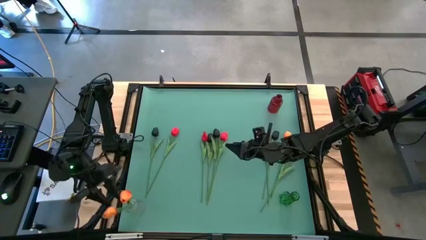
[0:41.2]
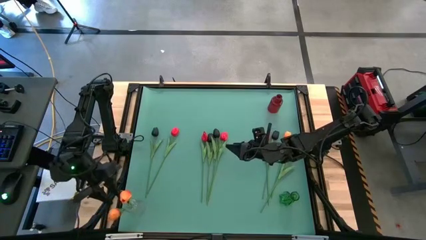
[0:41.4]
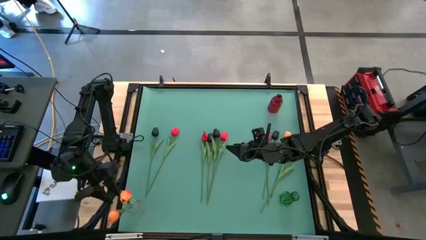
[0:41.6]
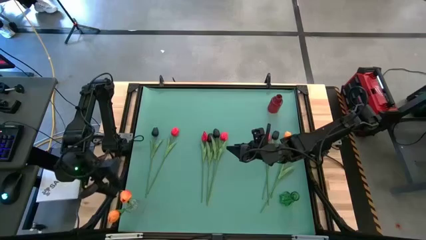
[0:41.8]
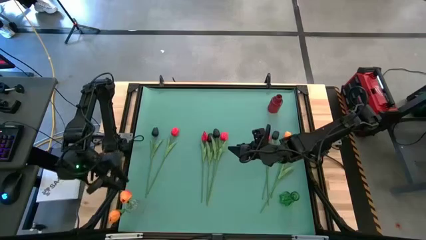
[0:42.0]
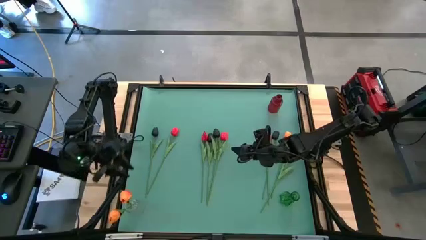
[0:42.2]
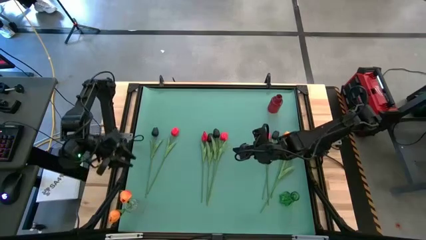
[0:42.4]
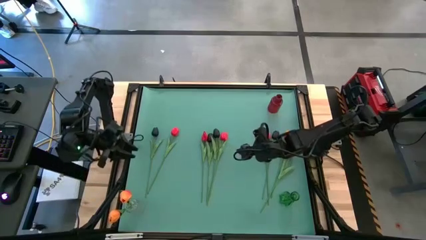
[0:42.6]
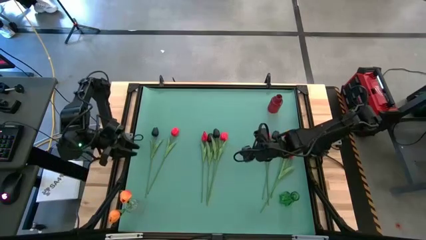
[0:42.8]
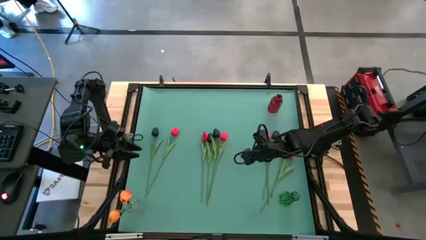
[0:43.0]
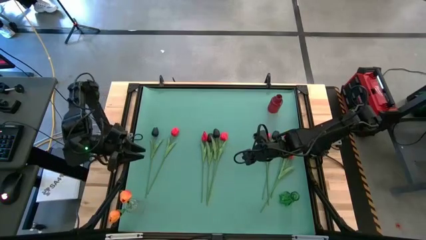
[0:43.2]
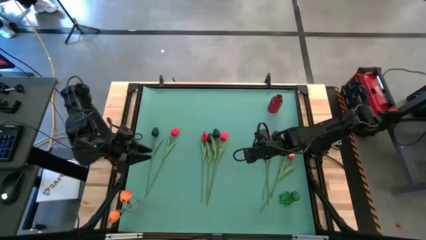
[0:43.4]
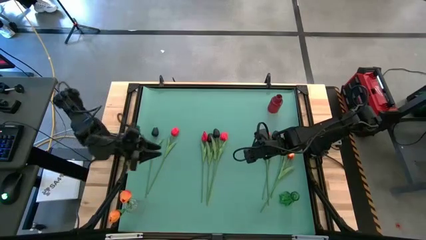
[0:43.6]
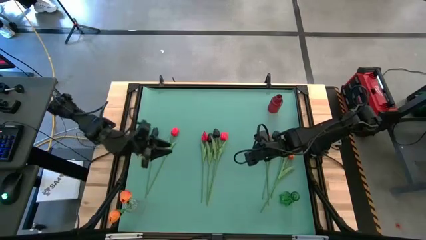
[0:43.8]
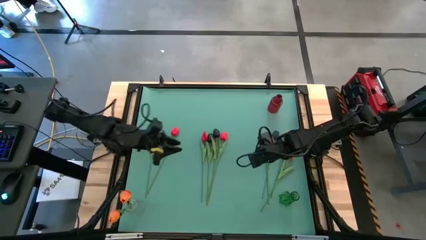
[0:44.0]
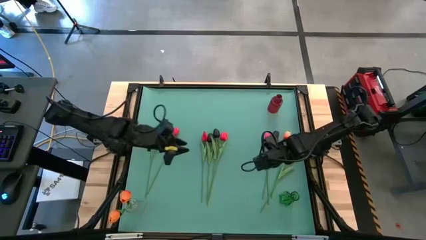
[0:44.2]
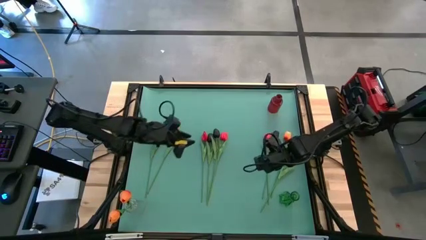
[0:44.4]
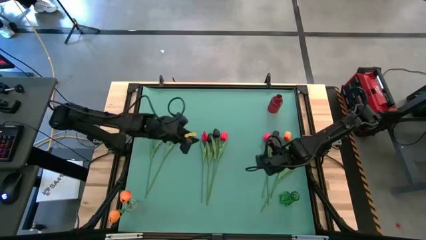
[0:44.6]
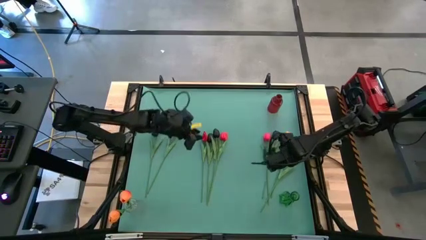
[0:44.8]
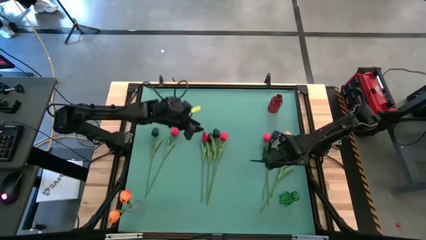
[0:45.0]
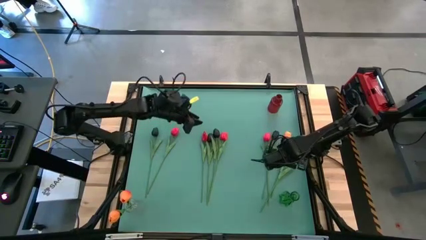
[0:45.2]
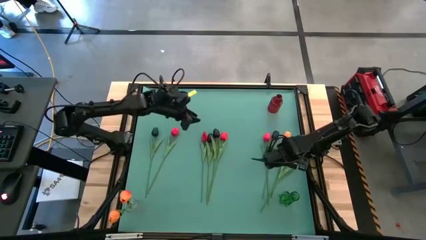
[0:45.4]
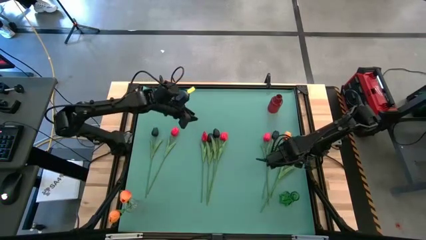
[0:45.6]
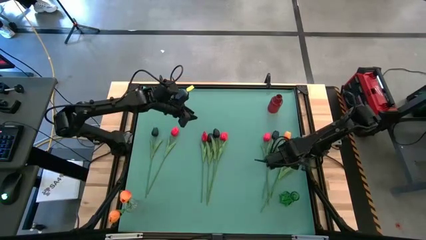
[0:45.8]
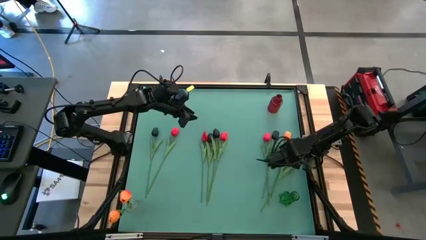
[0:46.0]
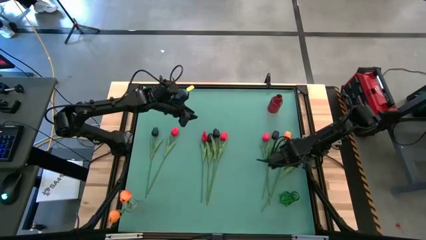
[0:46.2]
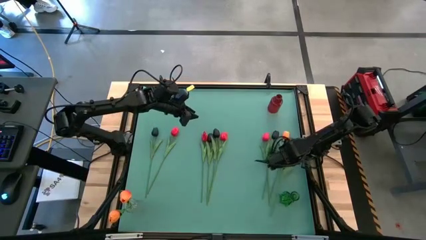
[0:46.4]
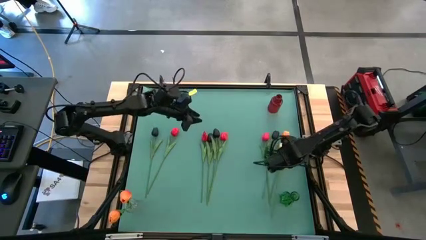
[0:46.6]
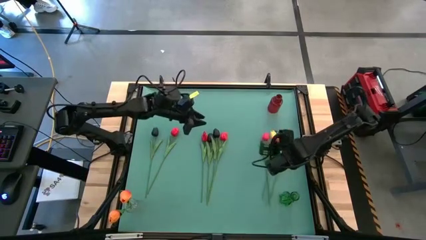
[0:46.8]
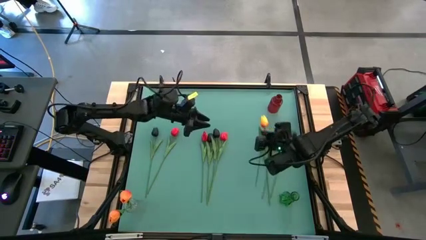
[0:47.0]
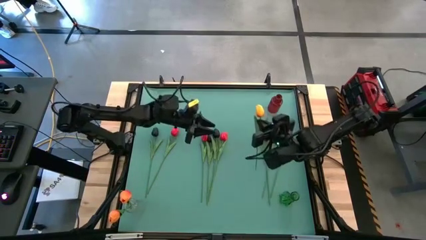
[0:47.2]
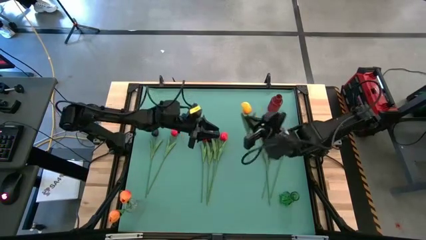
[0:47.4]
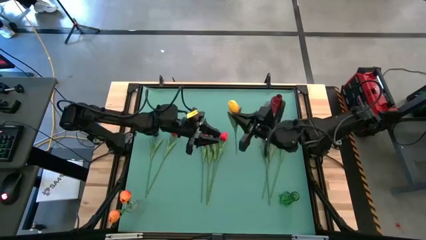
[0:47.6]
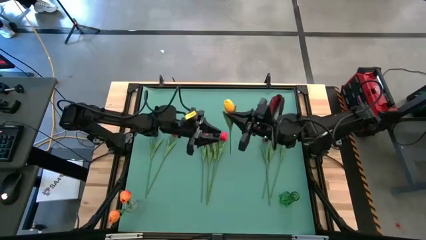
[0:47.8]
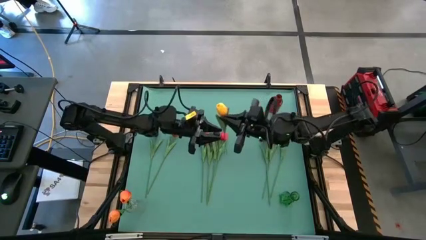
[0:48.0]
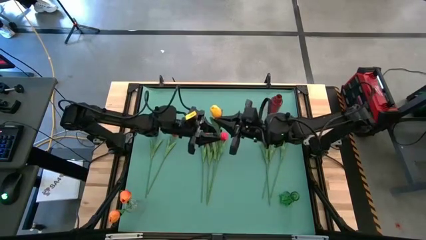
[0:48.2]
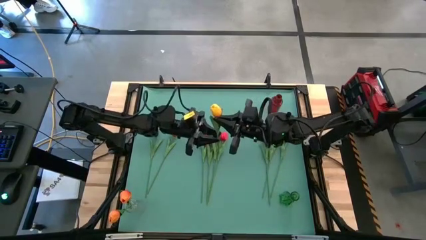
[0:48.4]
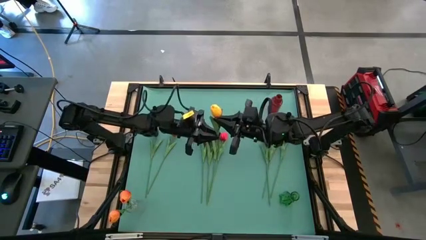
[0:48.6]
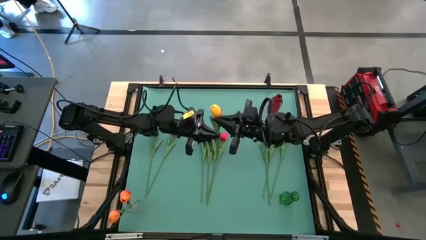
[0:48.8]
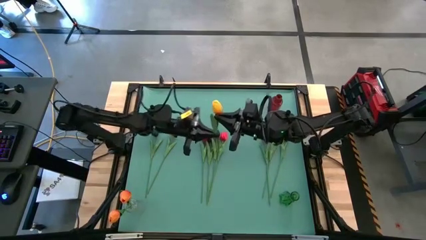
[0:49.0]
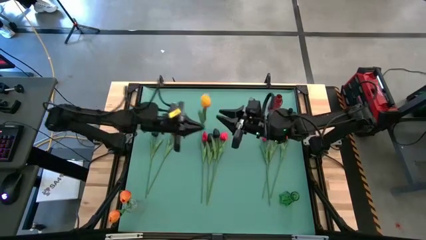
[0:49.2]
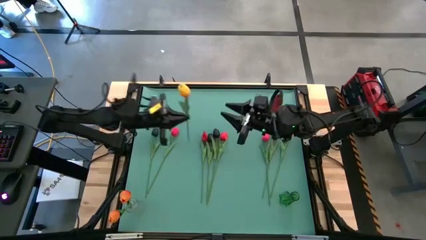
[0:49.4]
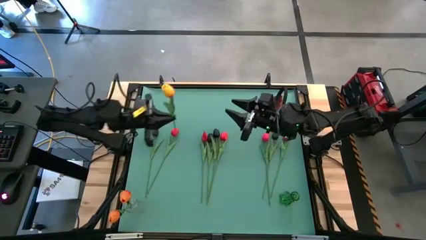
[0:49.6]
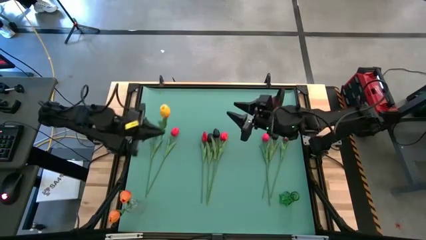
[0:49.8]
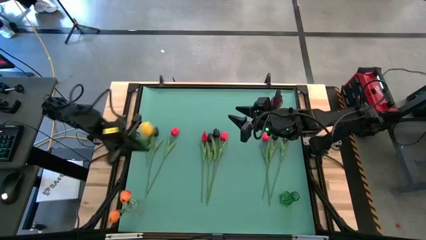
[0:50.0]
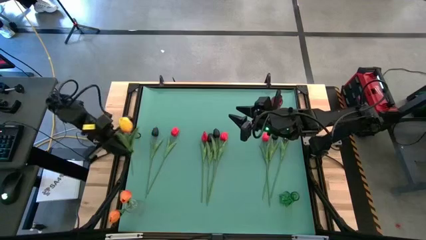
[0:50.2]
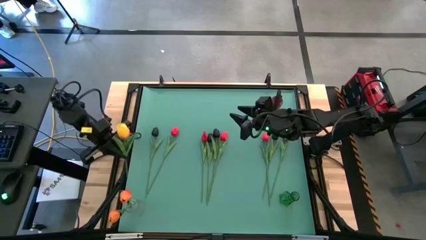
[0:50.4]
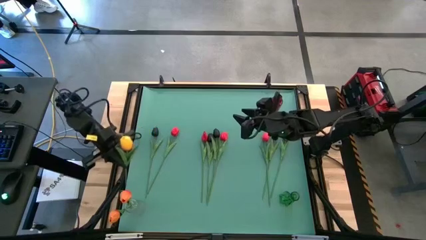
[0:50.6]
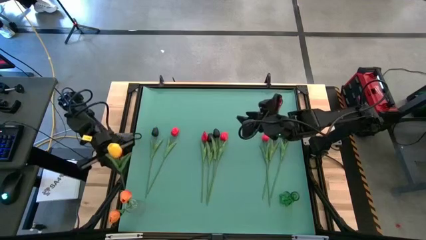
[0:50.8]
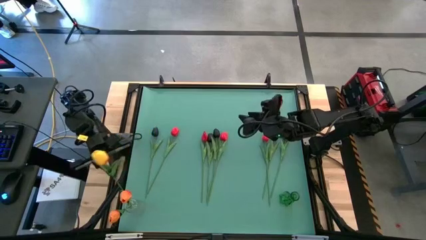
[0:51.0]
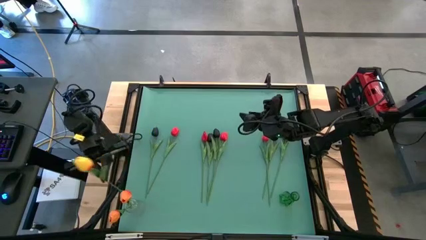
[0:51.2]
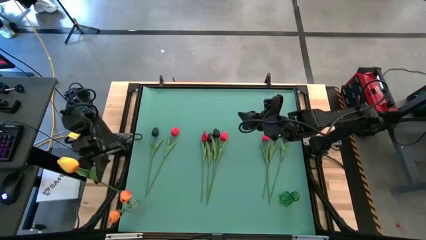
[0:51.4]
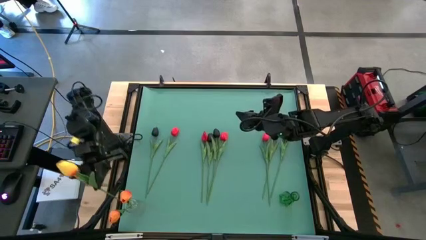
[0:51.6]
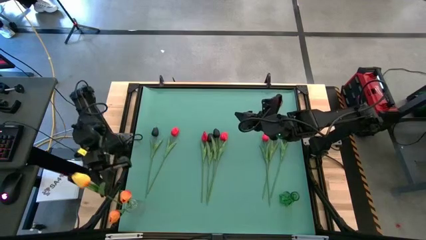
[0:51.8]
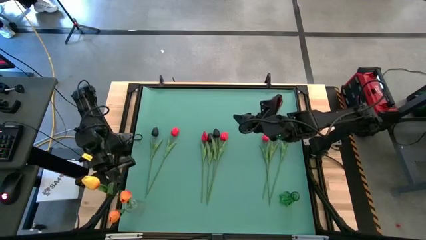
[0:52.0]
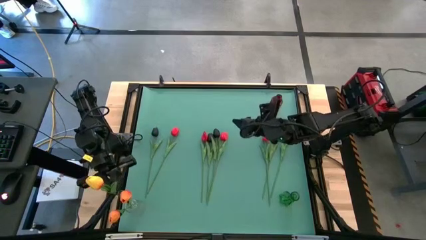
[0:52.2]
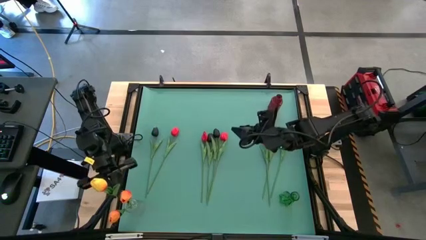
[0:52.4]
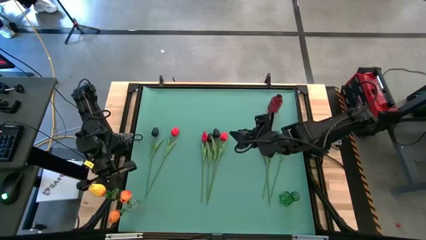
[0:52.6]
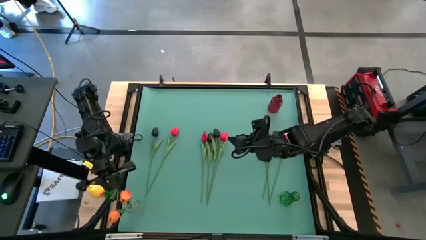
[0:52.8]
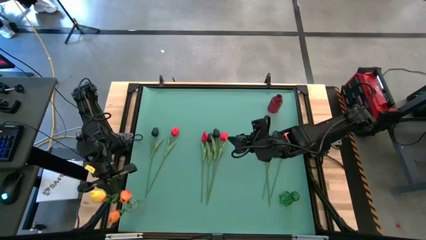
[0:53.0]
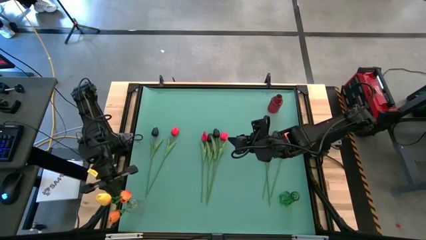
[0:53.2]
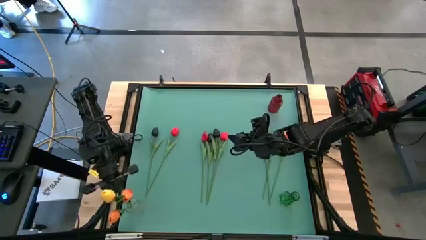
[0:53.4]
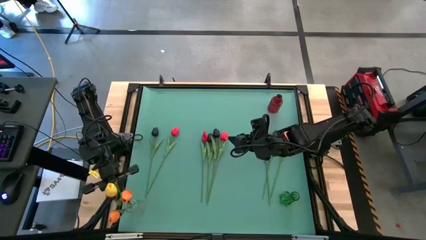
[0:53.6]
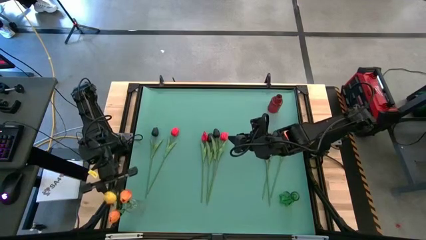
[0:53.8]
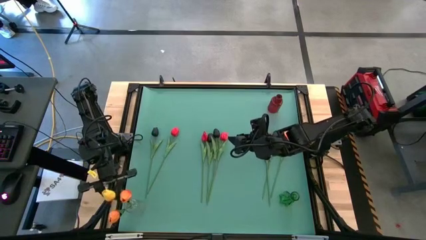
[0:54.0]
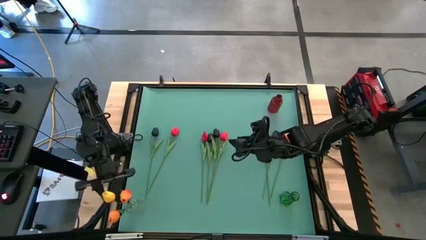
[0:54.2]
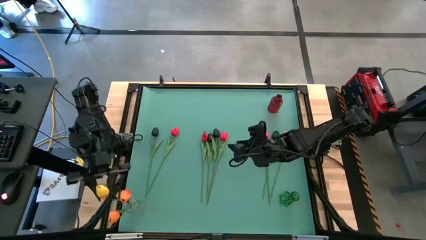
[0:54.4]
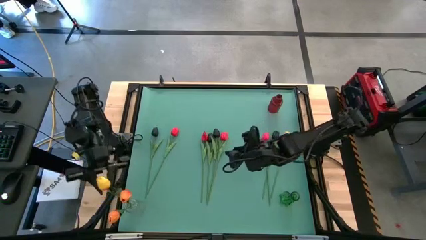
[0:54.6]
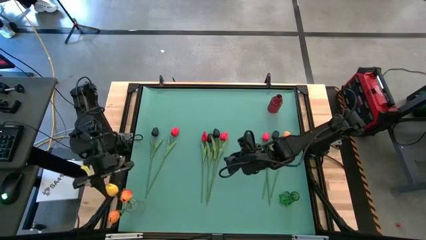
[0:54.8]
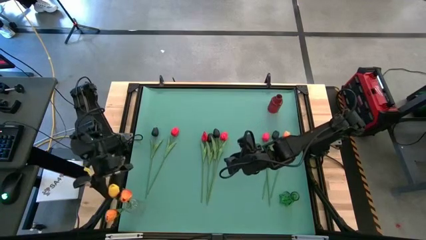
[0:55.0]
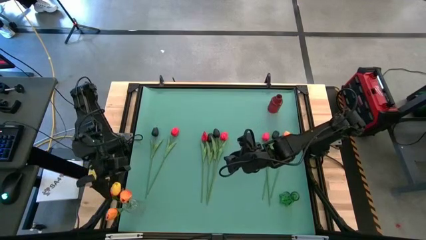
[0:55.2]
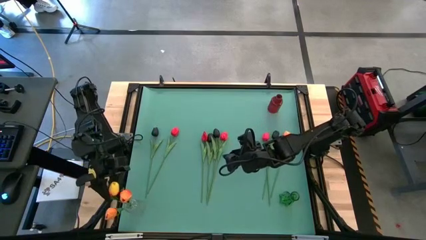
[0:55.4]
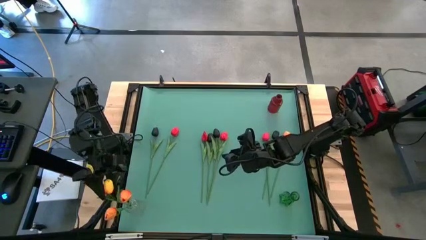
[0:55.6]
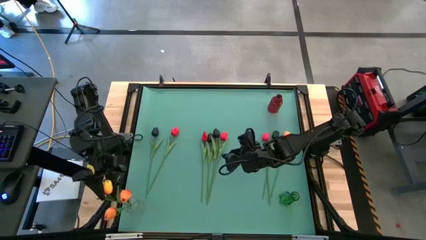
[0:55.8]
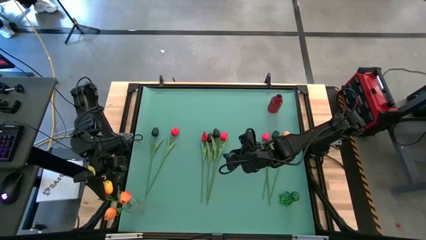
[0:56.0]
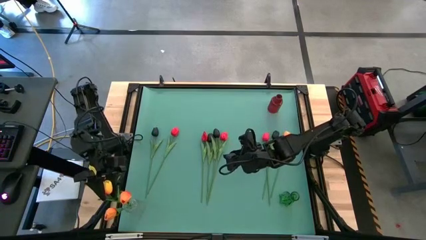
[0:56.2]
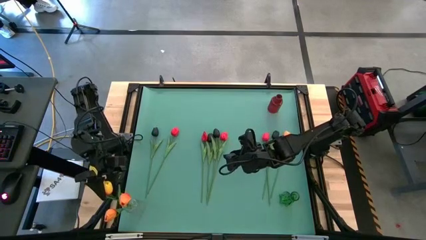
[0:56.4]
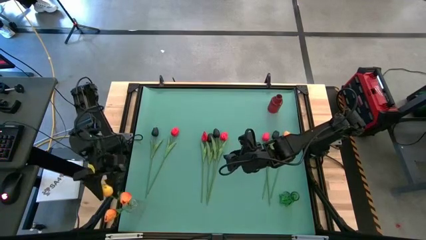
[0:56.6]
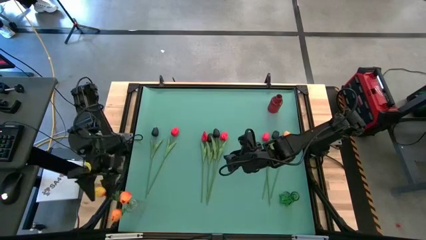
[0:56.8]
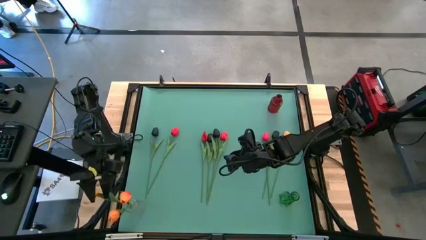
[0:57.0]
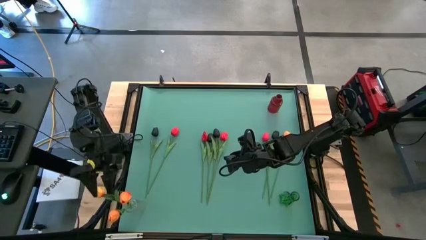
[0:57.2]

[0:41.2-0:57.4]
Task: Sort flowers into vase by color
Put the orange tulip into the transparent vase
